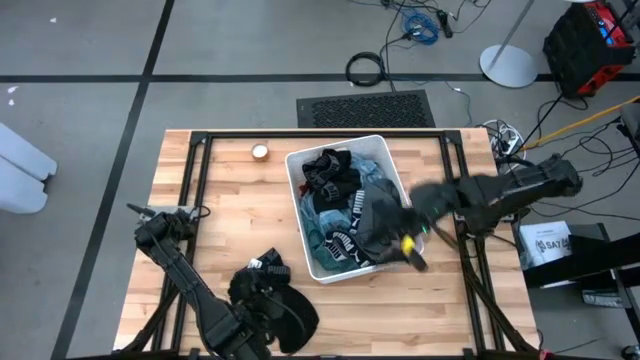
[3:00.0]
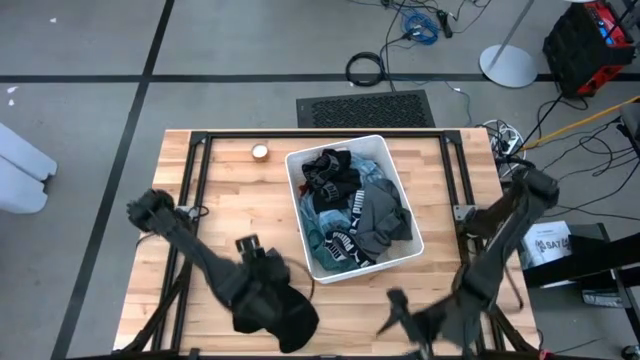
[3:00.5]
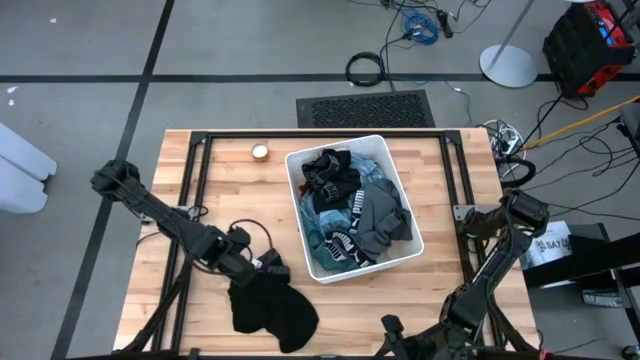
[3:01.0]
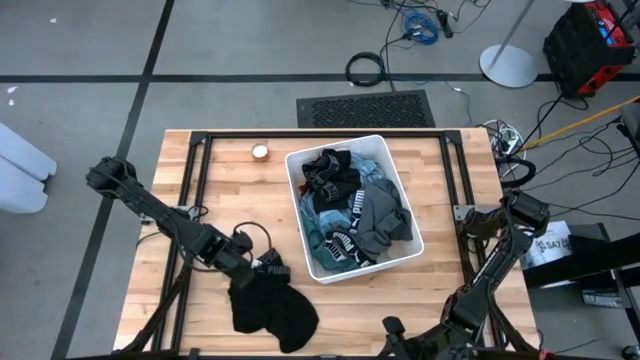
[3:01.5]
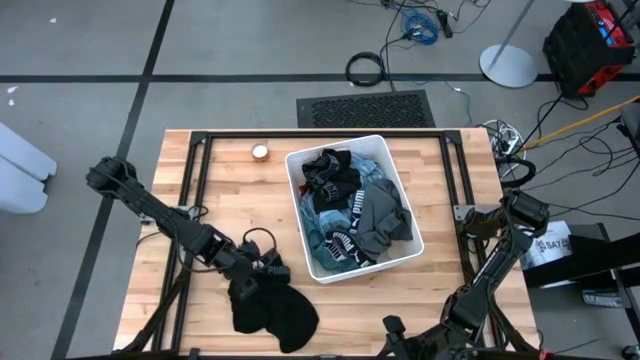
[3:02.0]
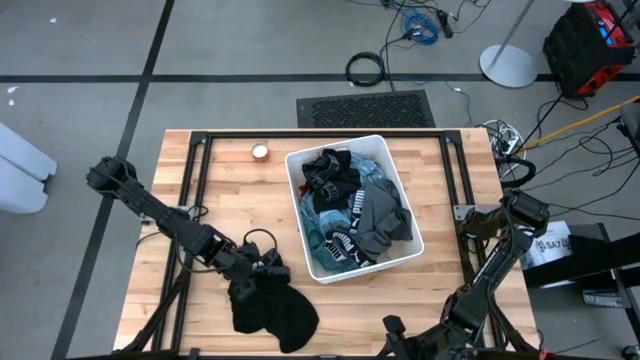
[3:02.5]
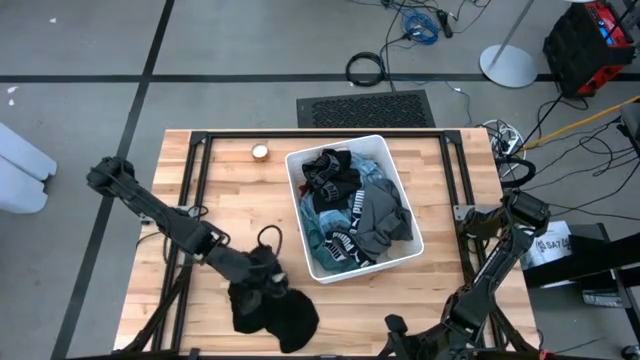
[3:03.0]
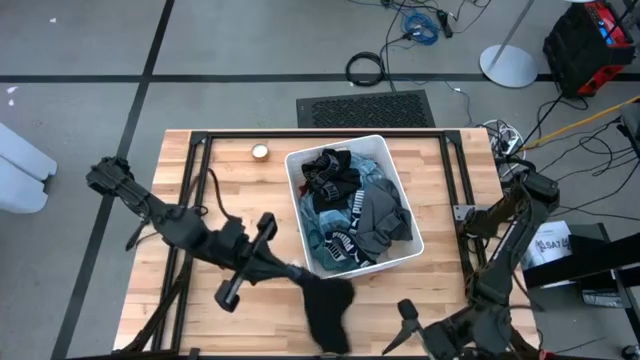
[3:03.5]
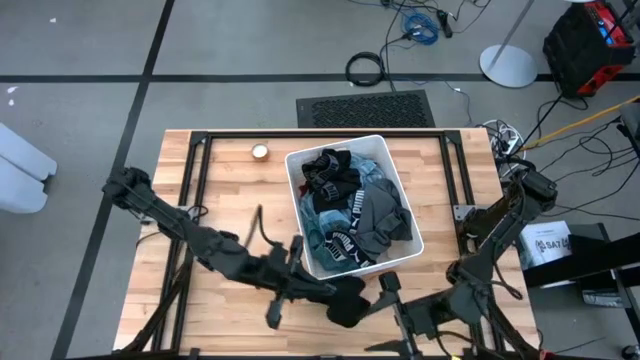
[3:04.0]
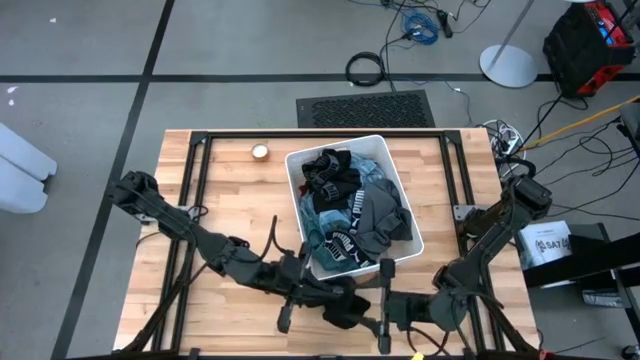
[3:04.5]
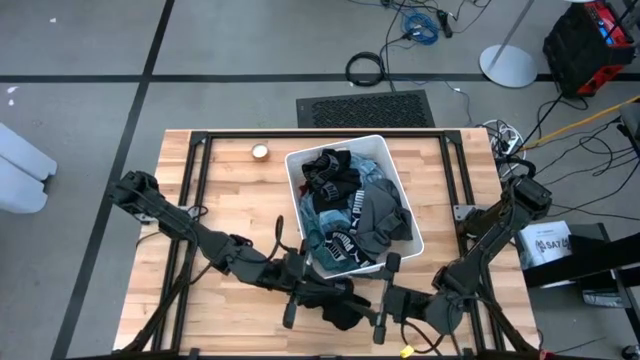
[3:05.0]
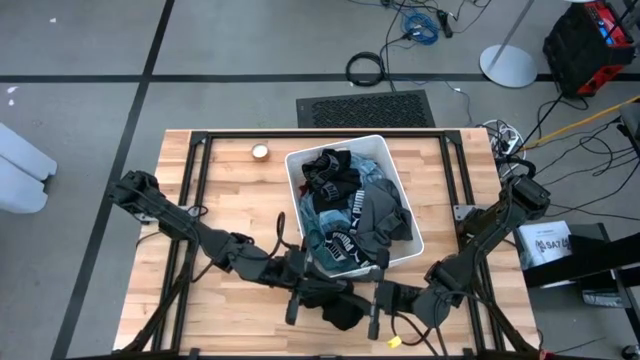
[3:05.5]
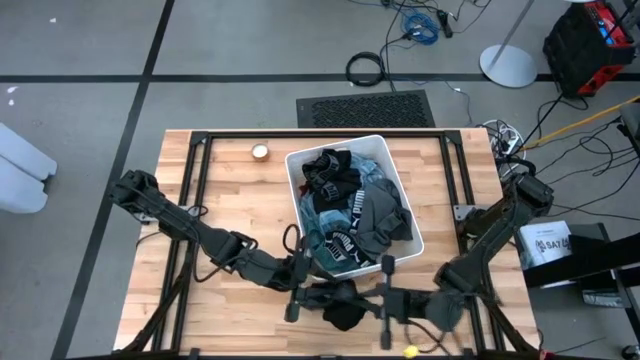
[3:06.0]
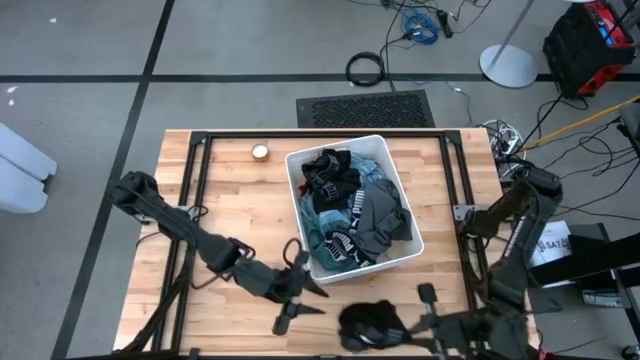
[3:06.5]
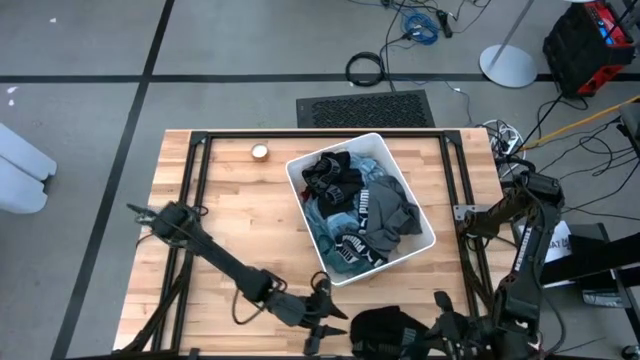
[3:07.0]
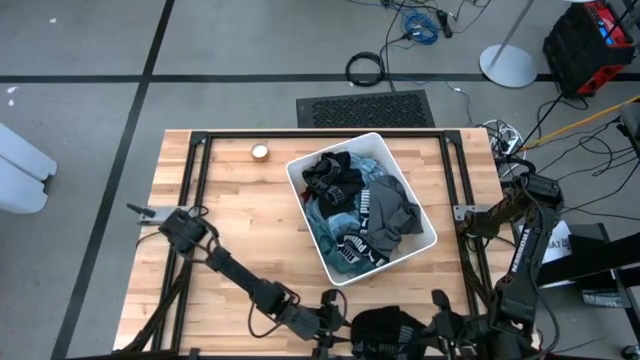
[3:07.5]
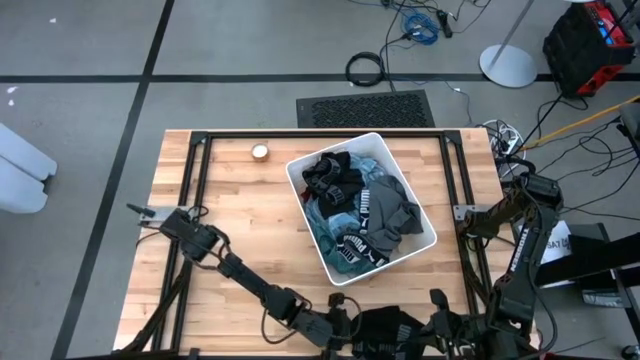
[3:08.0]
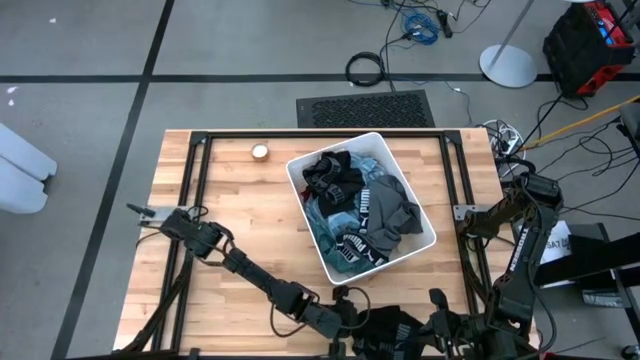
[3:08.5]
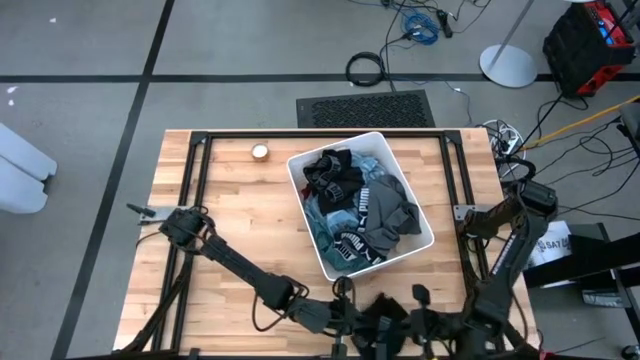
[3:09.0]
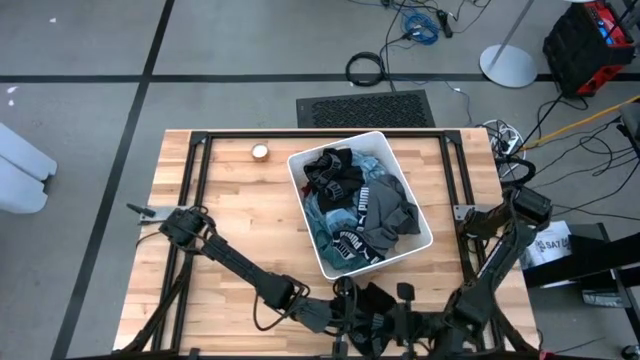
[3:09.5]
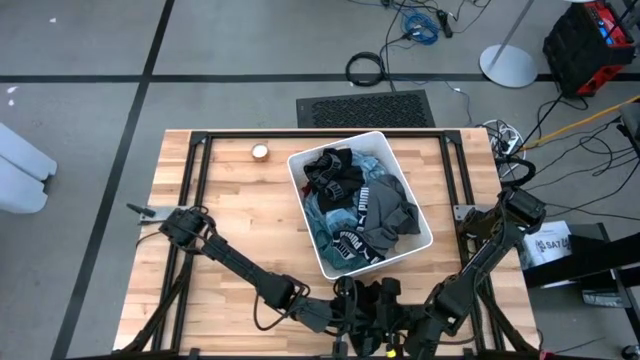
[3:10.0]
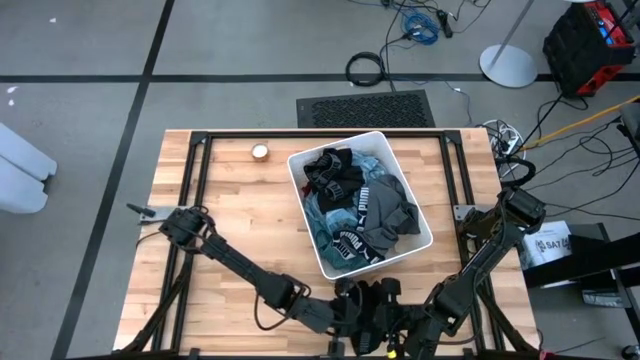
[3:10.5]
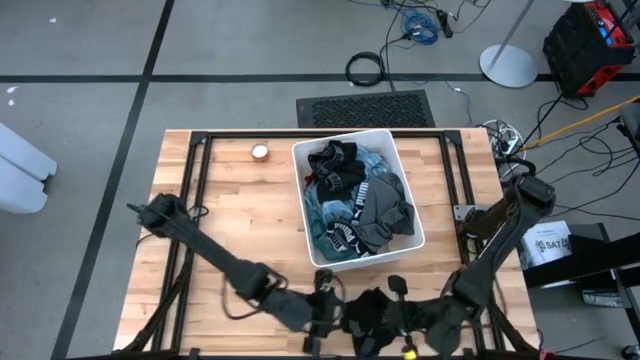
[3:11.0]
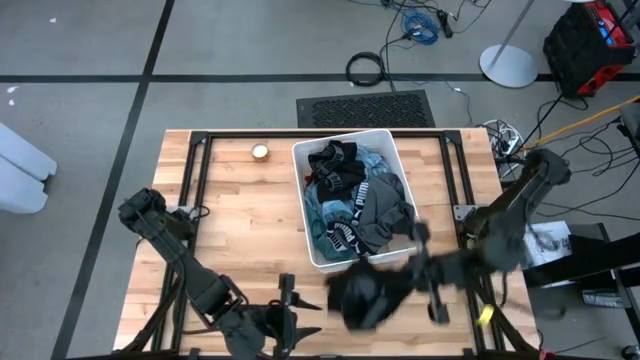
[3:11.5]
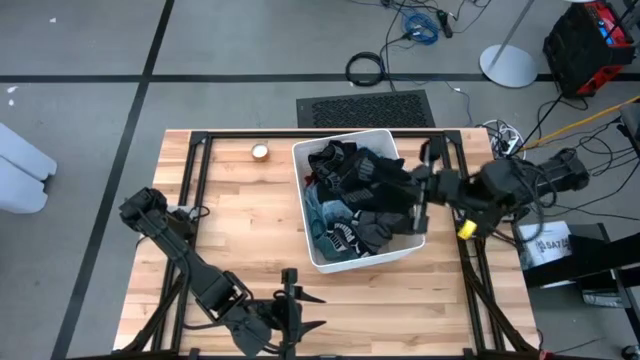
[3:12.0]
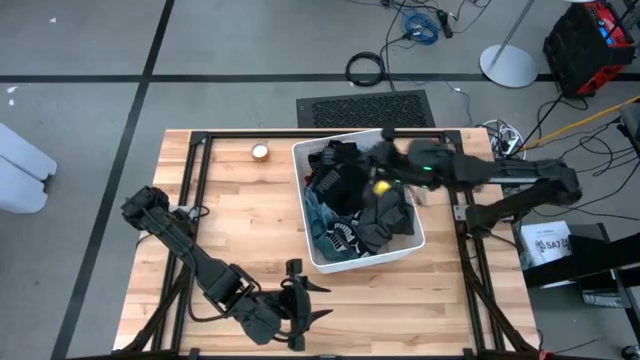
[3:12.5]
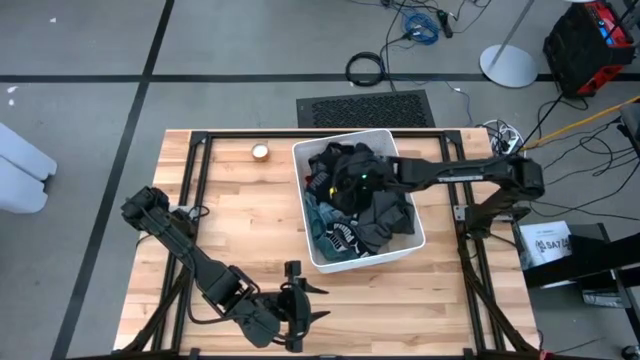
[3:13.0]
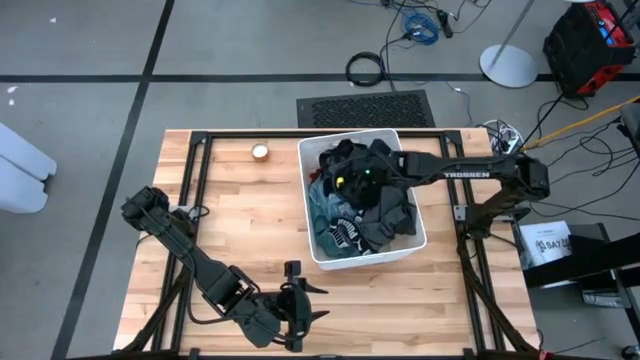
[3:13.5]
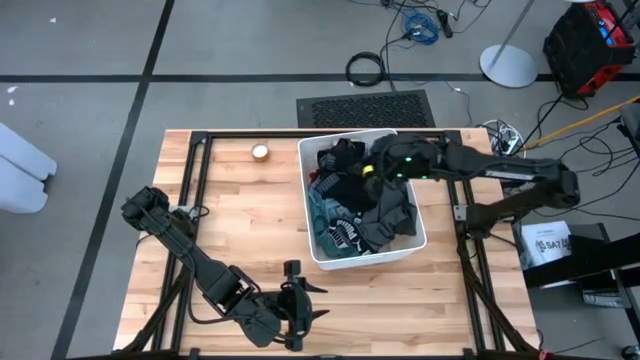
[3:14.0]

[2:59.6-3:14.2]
Task: Sort clothes
Put the black boxer into the laundry bin

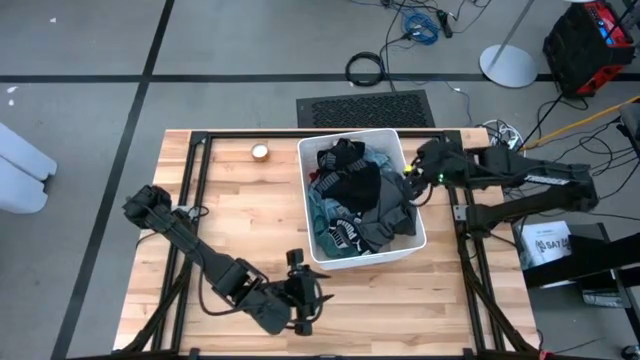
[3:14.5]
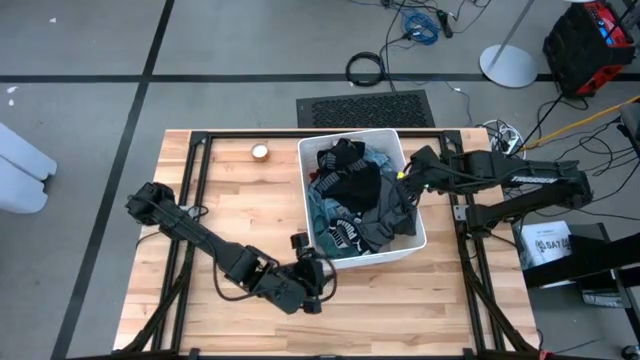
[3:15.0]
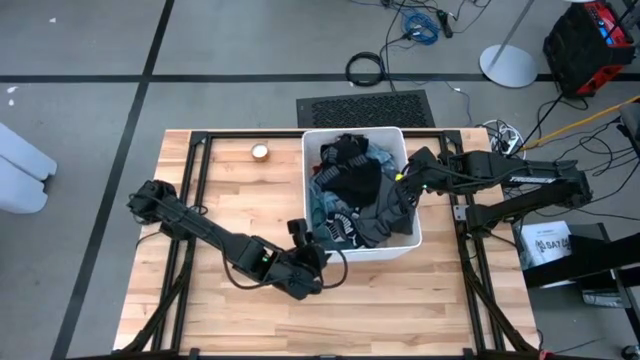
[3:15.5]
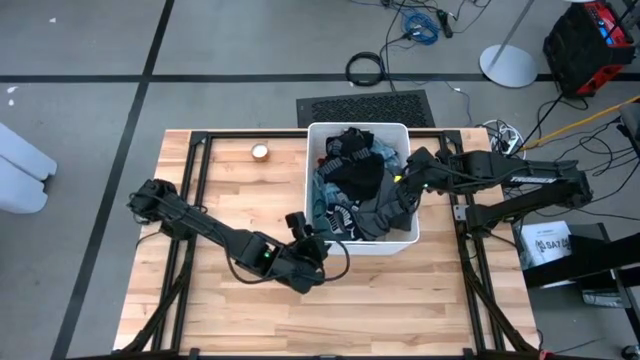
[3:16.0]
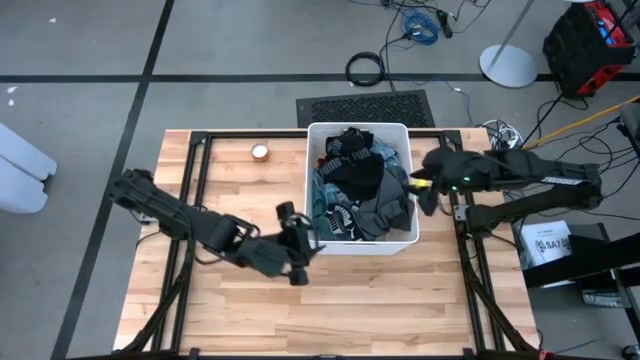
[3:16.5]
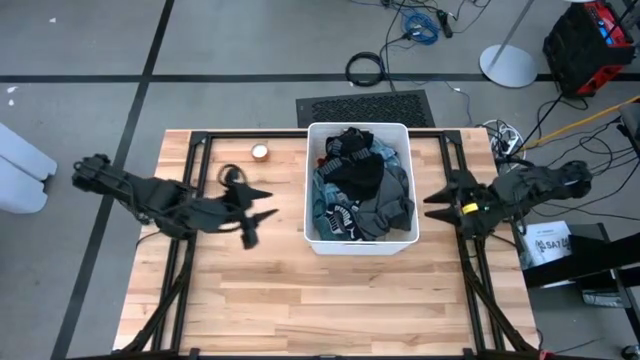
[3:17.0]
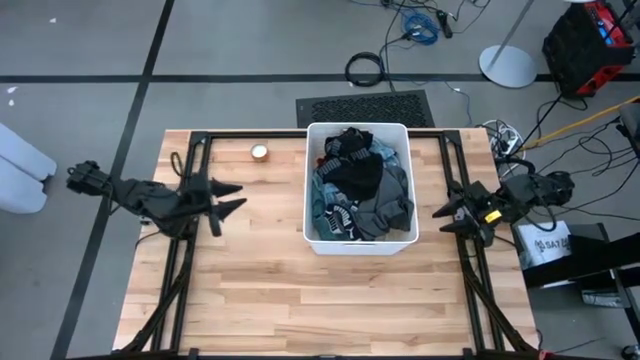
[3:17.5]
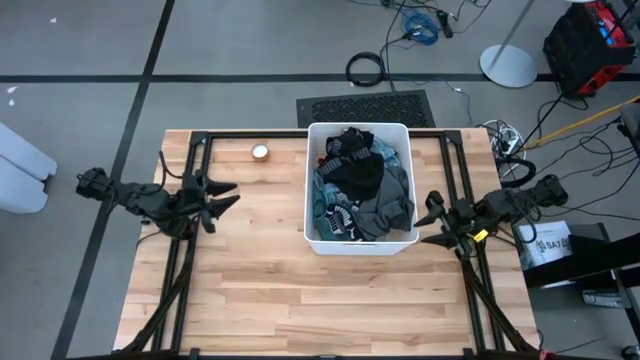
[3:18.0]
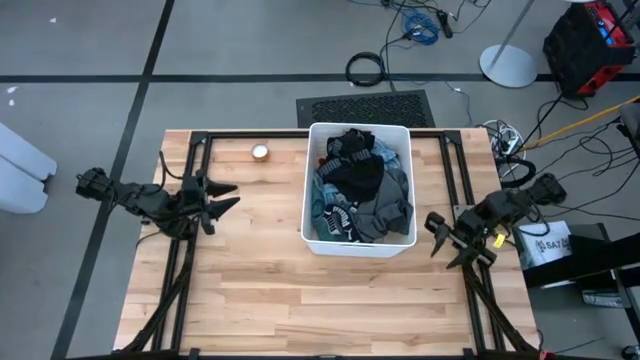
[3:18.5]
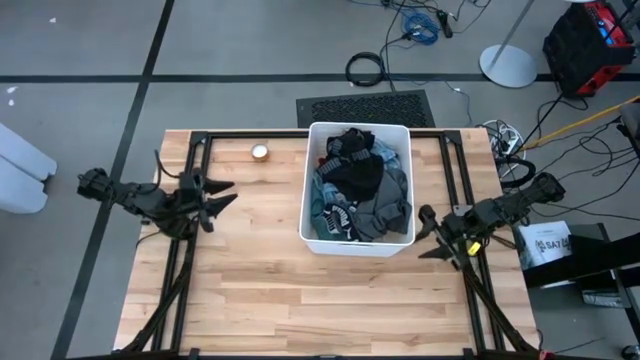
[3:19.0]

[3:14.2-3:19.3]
Adjust the laundry bin on the table

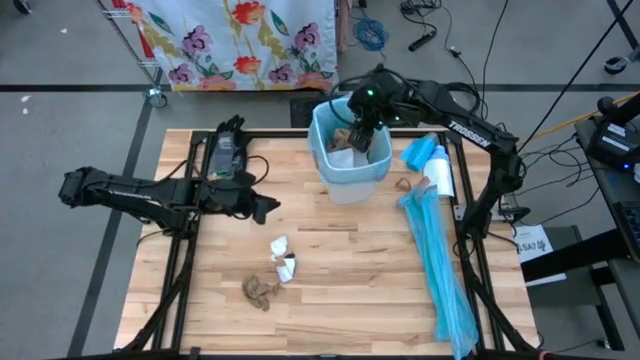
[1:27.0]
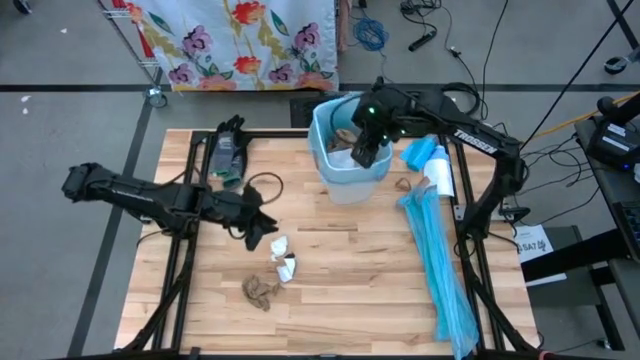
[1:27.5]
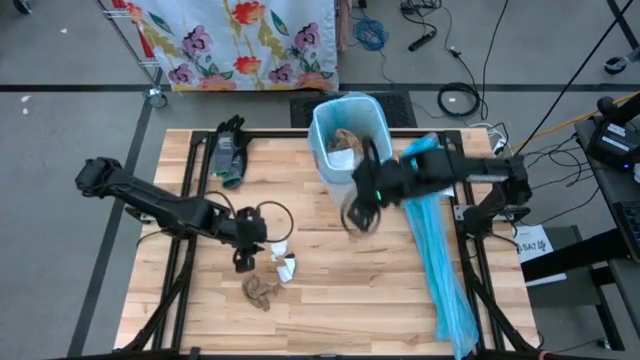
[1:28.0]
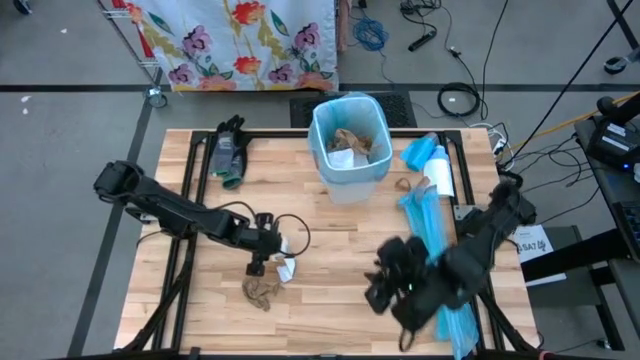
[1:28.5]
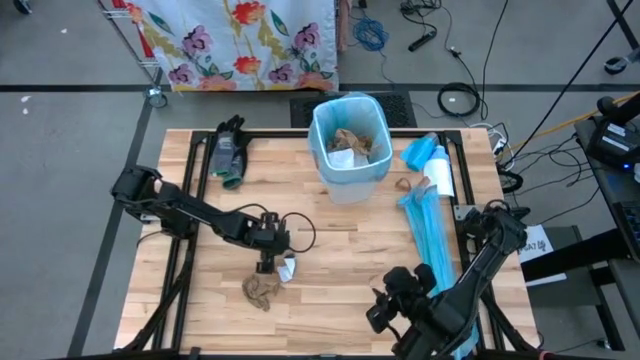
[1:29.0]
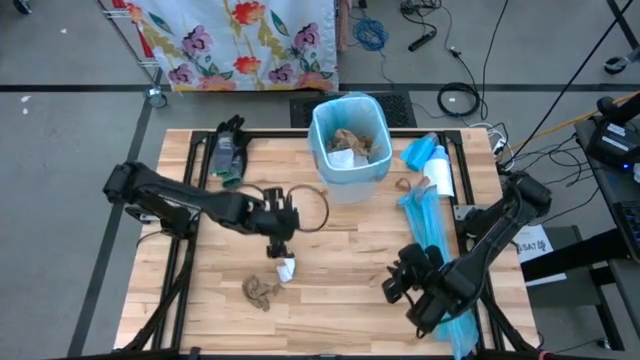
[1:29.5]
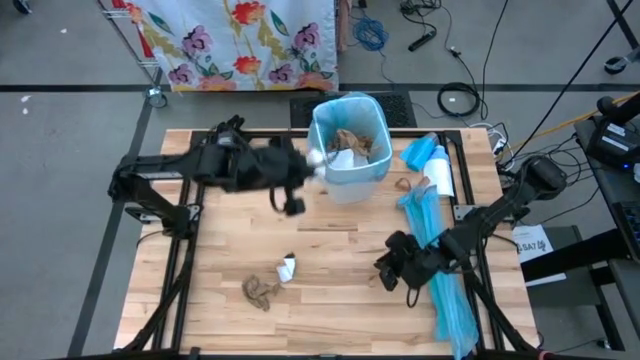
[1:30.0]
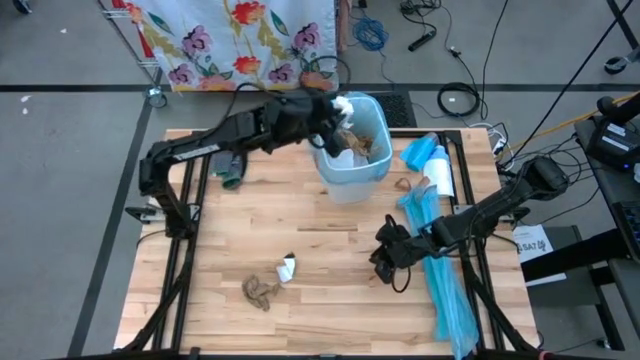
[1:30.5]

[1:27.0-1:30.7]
Task: place trash/remove bag and relplace
Put the white napkin into the trash bin
